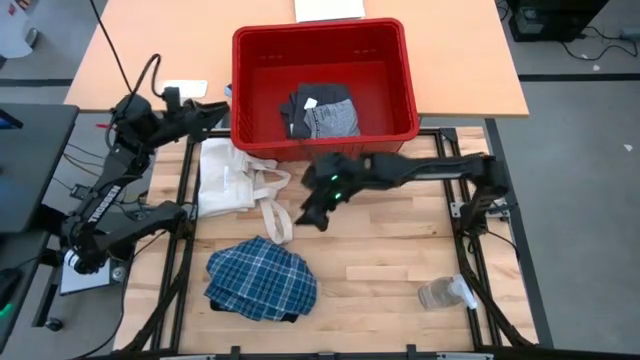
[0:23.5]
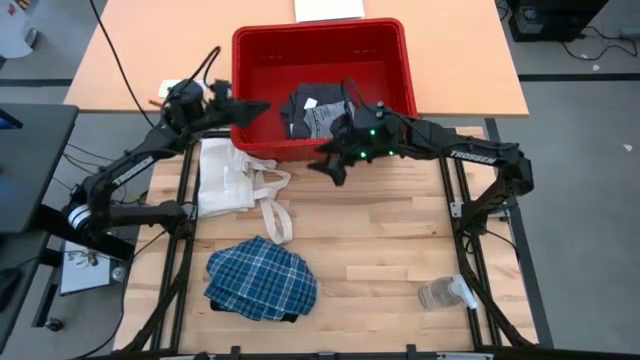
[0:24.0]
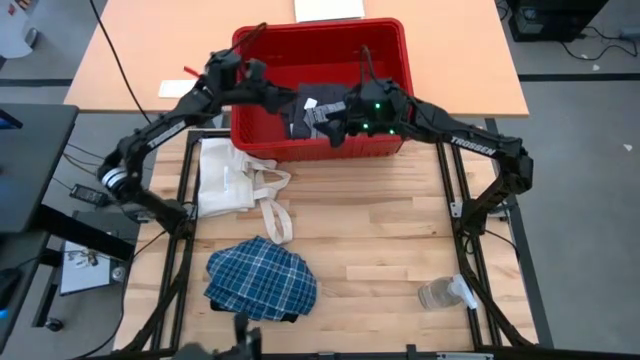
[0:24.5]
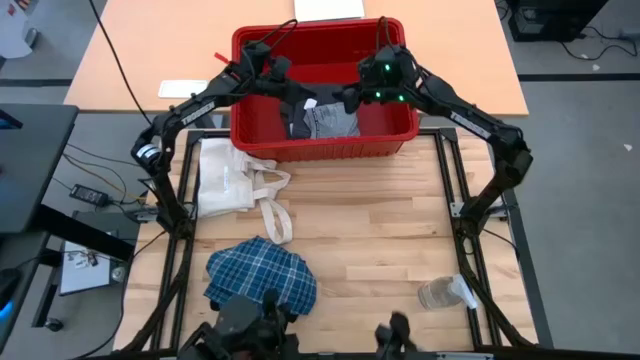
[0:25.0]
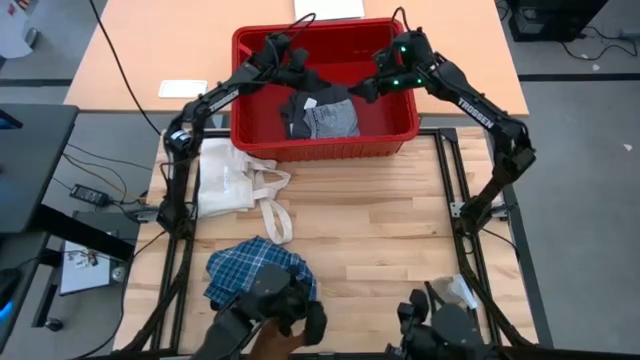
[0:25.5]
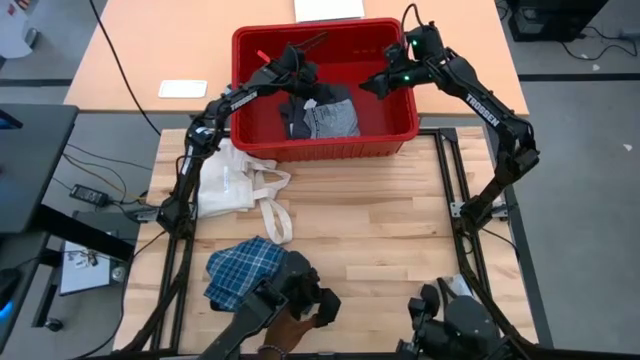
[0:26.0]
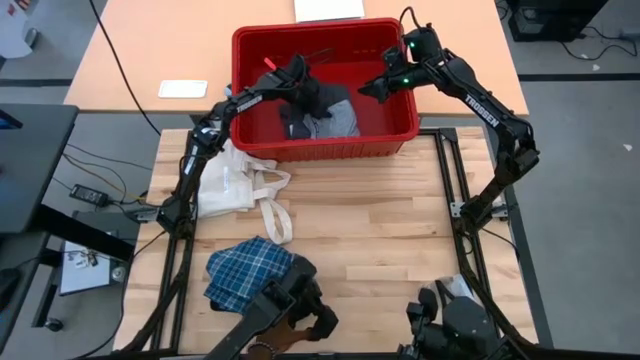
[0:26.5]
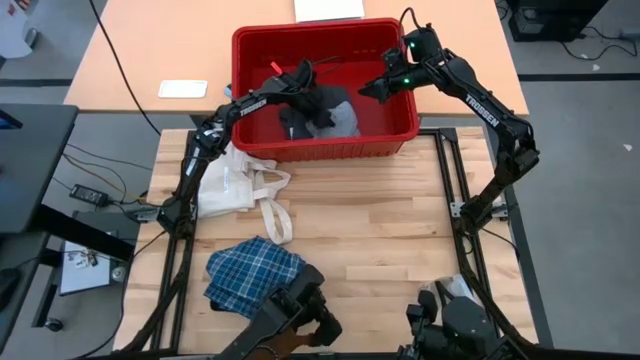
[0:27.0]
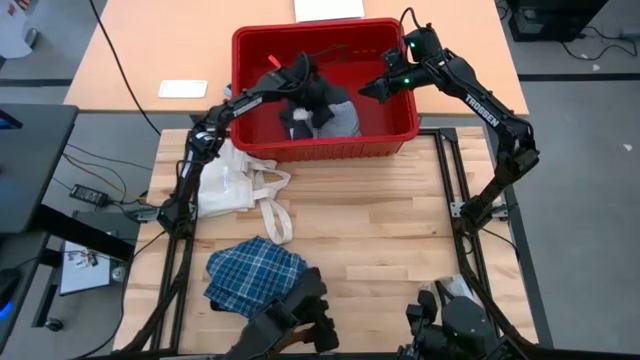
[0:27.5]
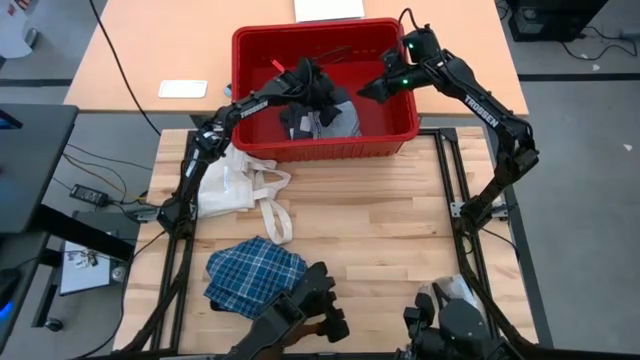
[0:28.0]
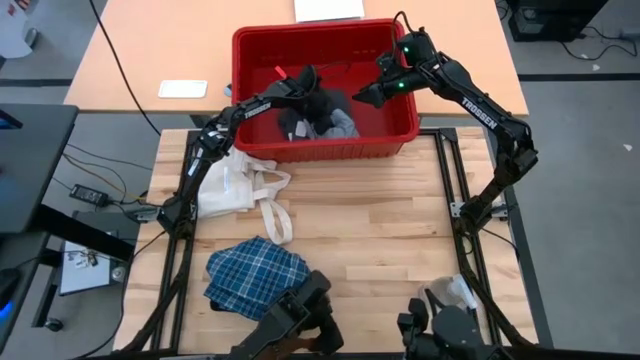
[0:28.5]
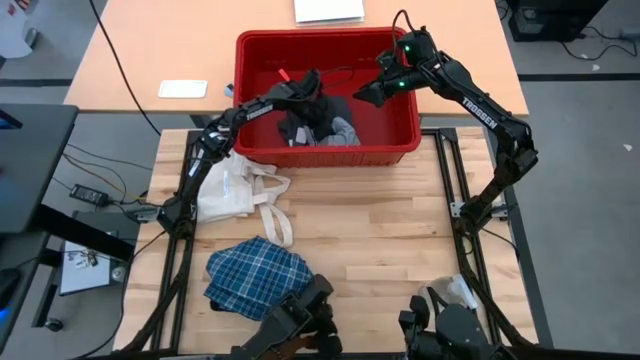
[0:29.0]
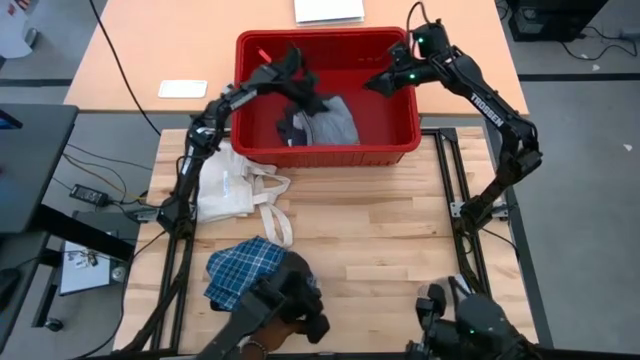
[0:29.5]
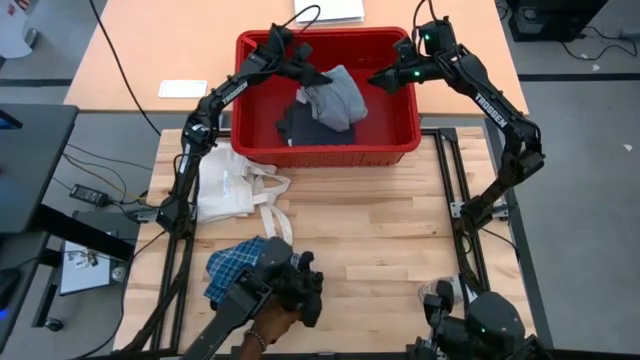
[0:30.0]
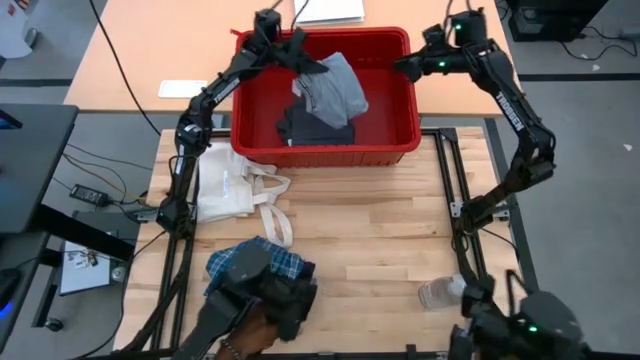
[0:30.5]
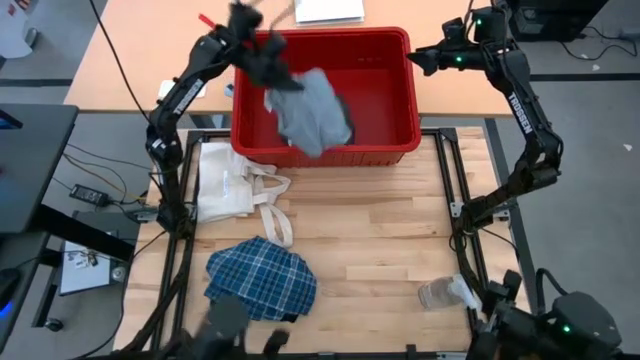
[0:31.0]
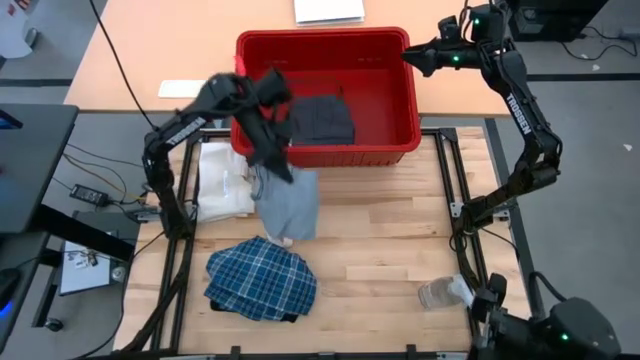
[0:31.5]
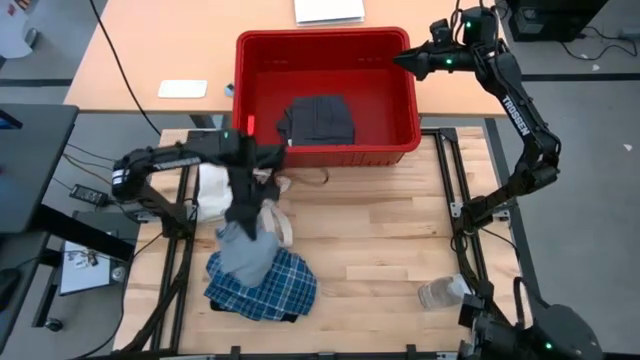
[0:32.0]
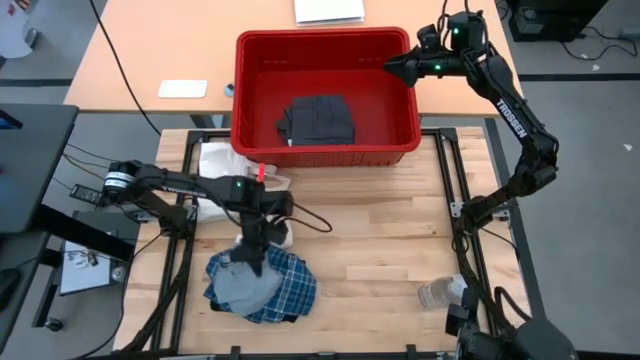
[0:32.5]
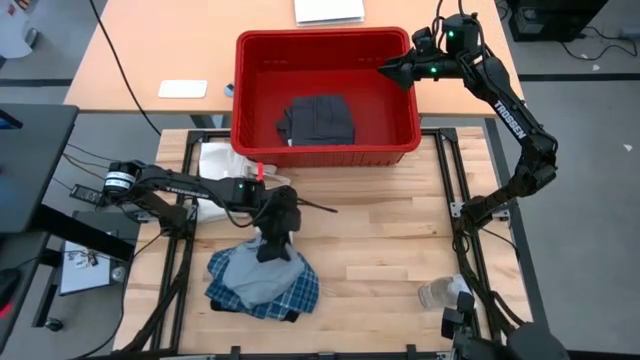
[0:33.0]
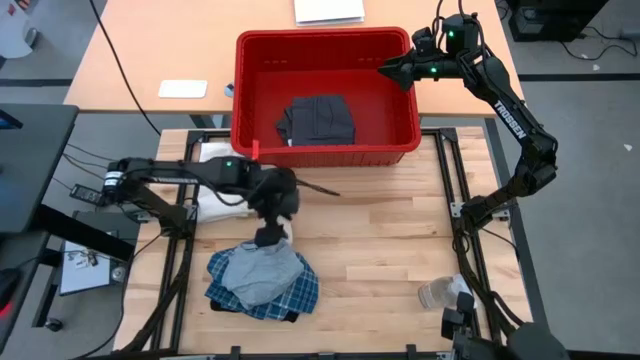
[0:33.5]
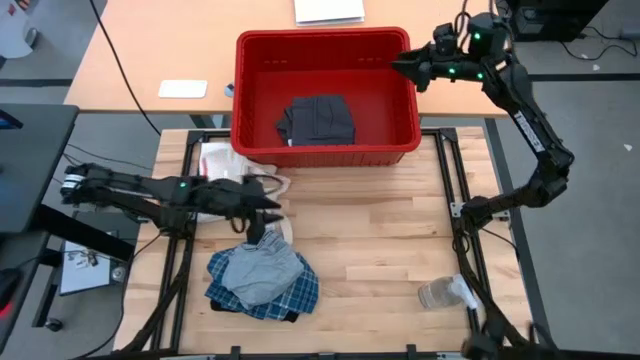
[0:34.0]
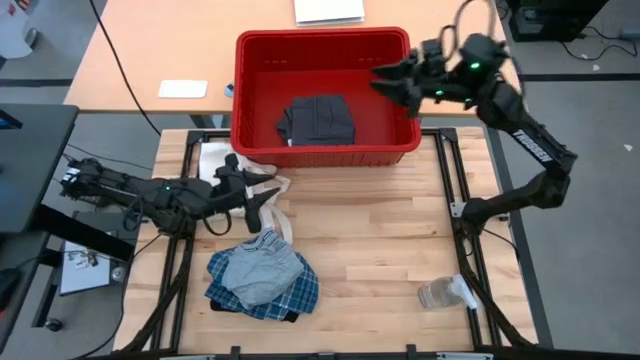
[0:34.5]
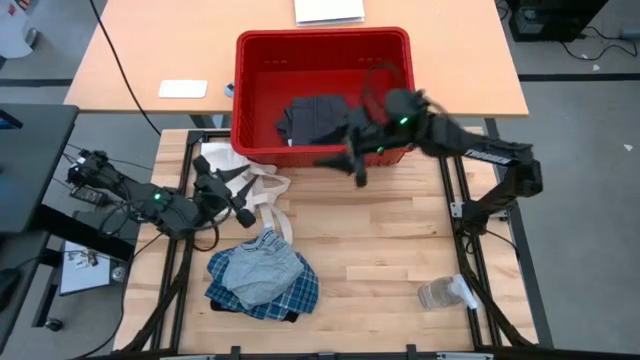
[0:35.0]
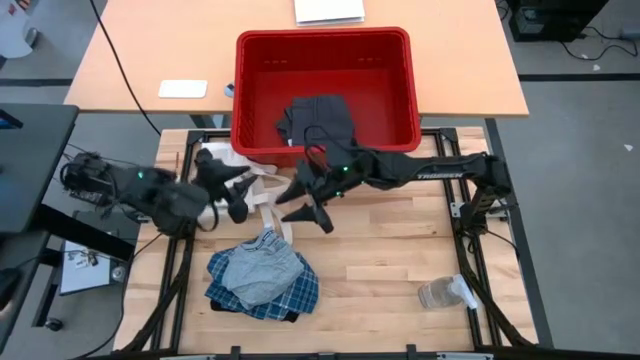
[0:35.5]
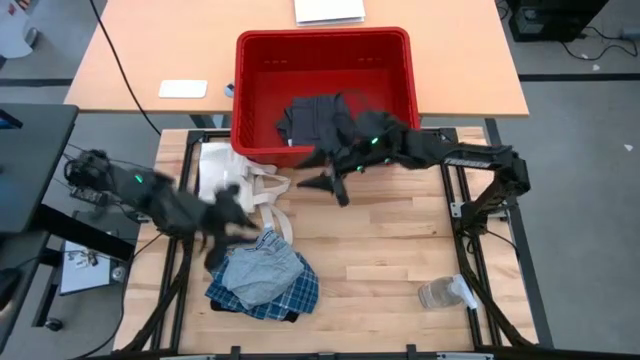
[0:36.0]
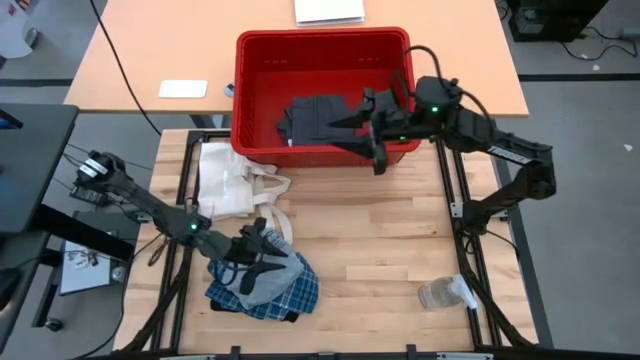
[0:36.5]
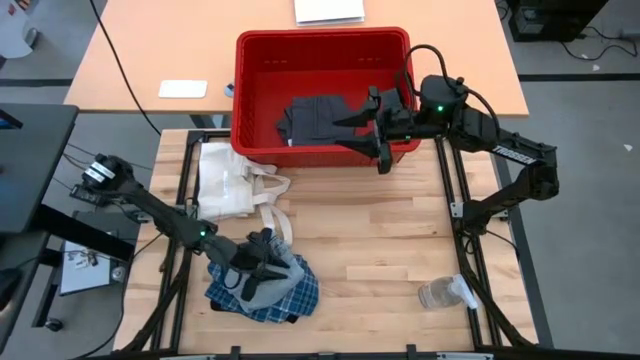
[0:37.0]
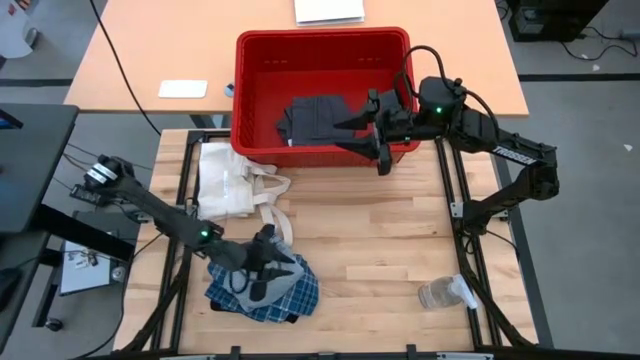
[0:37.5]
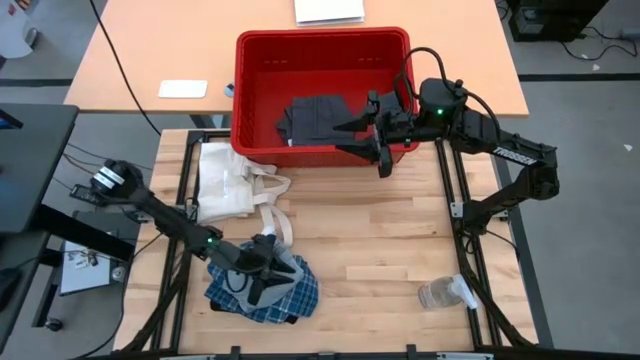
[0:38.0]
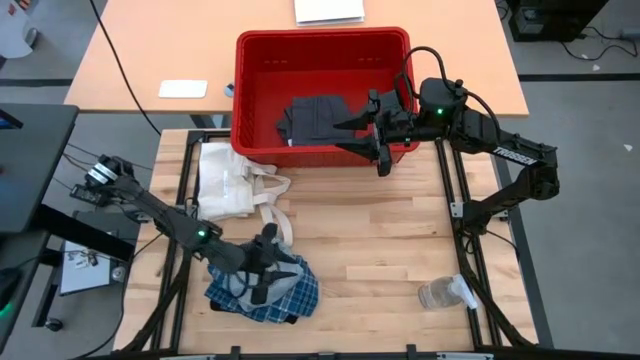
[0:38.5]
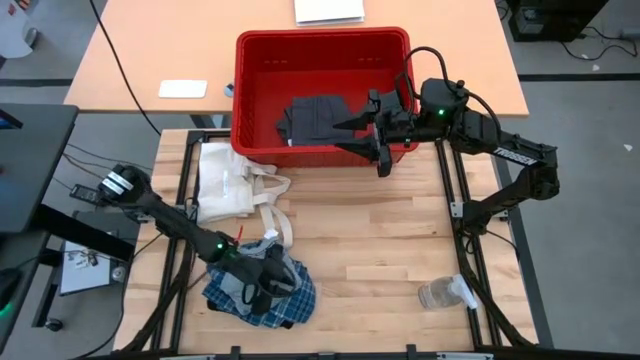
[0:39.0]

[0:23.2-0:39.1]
Task: Fold laundry
Remove the gray shirt from the red bin
